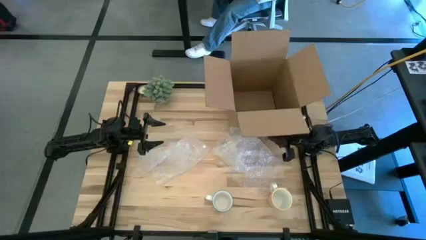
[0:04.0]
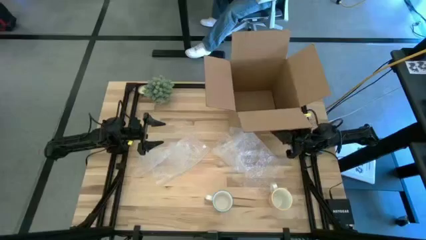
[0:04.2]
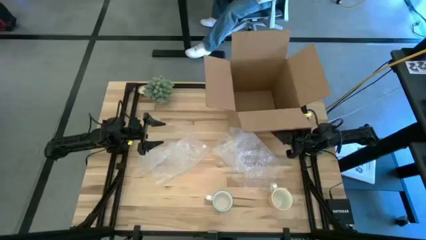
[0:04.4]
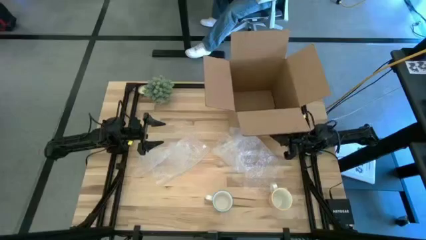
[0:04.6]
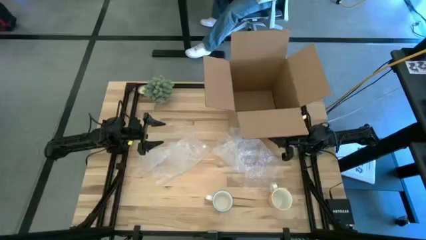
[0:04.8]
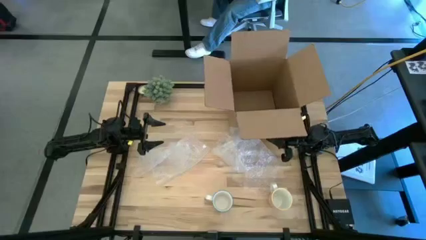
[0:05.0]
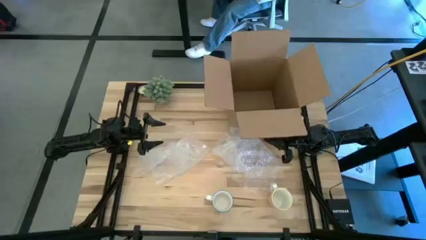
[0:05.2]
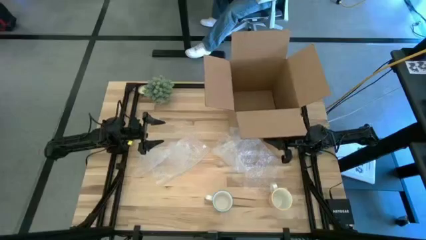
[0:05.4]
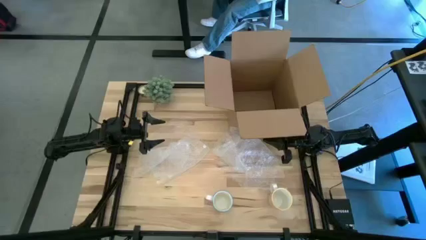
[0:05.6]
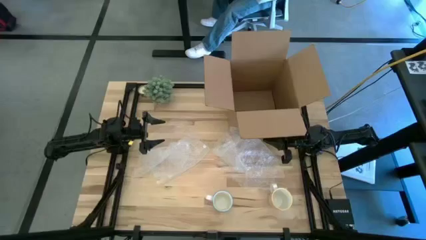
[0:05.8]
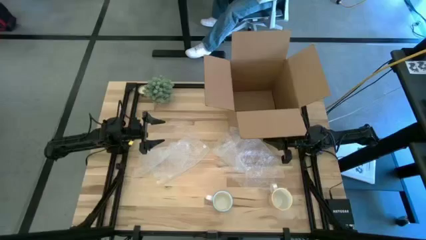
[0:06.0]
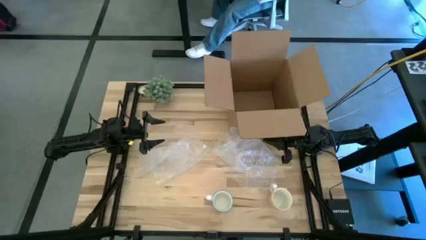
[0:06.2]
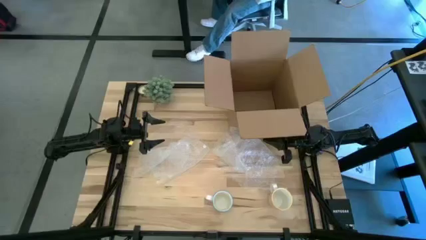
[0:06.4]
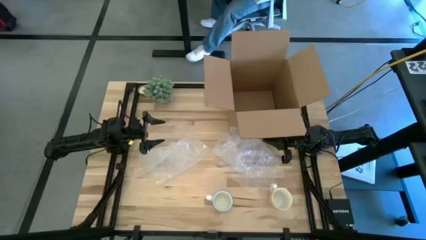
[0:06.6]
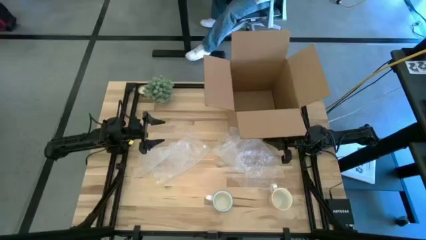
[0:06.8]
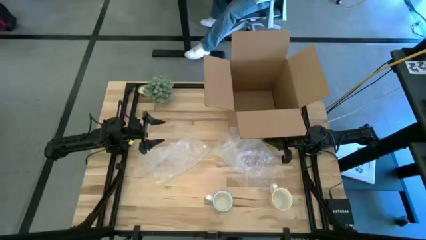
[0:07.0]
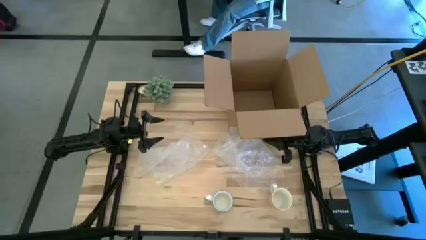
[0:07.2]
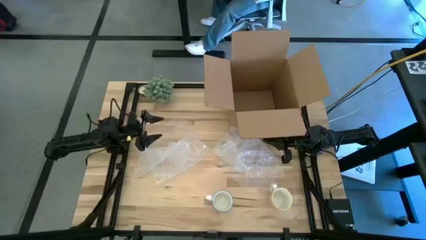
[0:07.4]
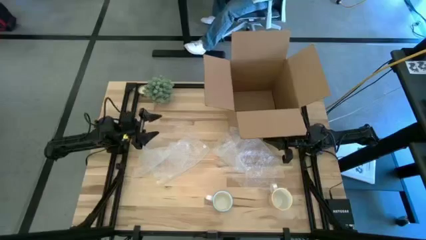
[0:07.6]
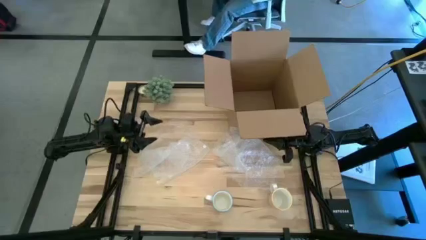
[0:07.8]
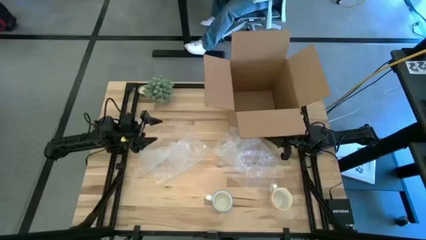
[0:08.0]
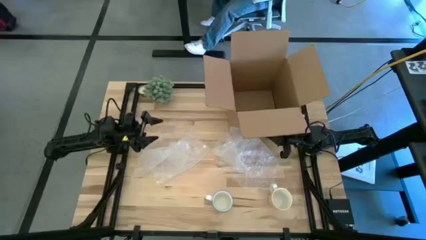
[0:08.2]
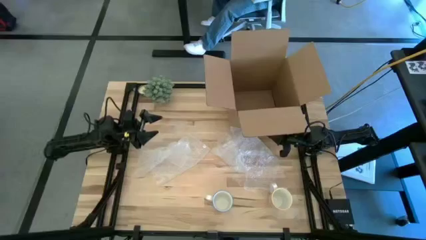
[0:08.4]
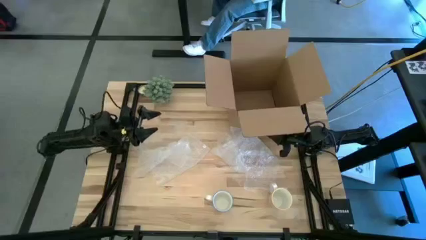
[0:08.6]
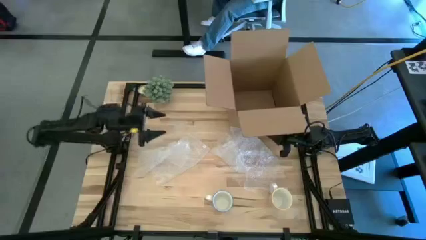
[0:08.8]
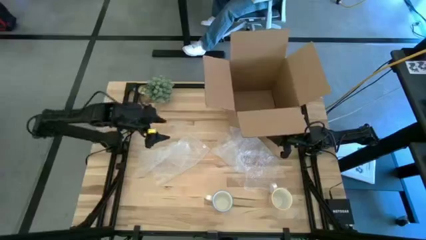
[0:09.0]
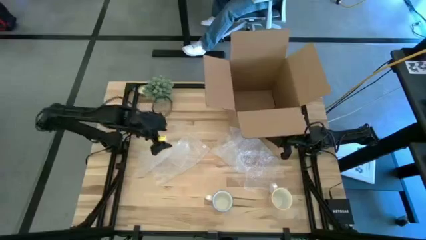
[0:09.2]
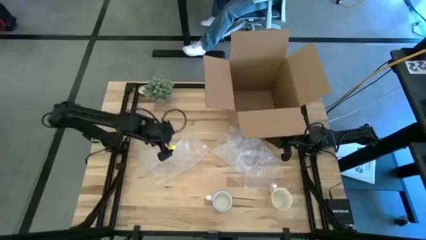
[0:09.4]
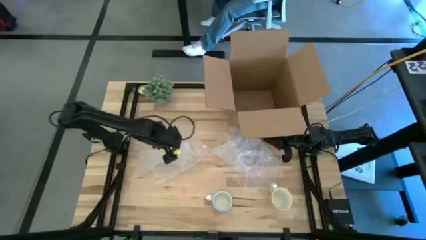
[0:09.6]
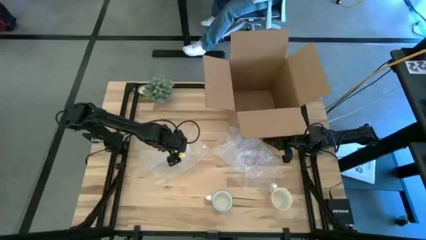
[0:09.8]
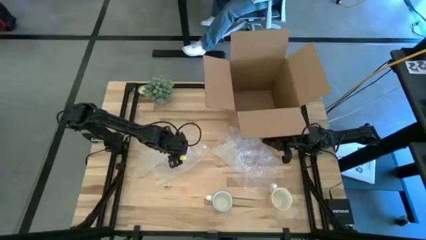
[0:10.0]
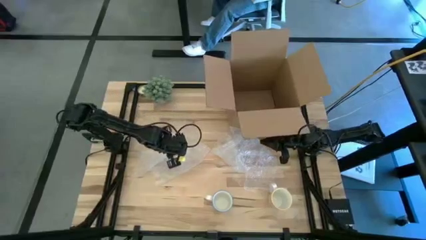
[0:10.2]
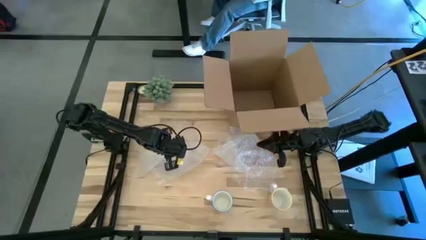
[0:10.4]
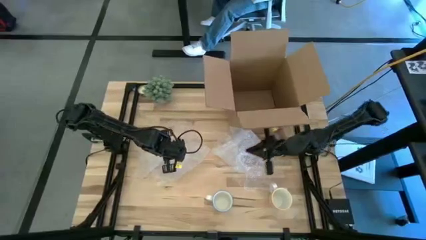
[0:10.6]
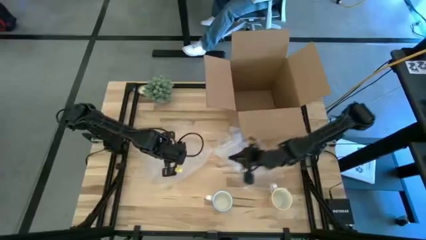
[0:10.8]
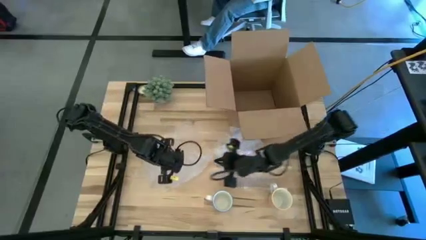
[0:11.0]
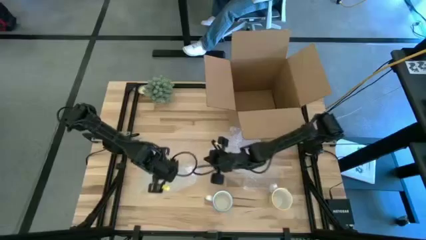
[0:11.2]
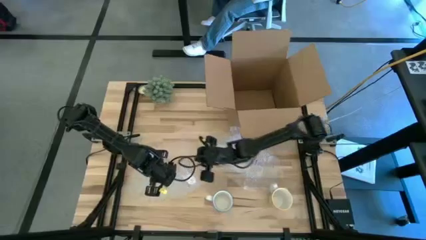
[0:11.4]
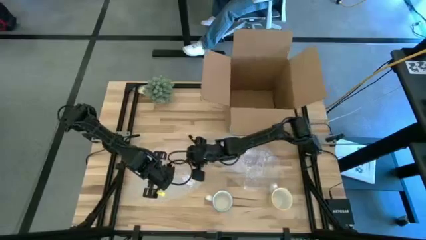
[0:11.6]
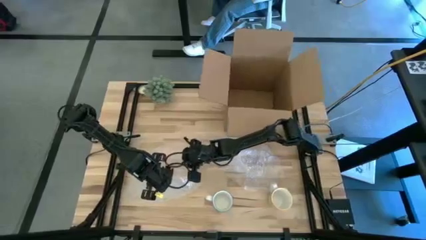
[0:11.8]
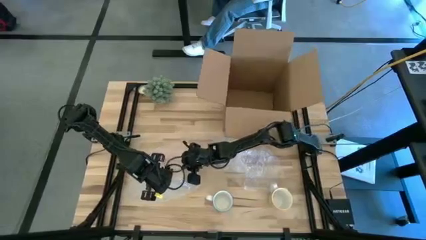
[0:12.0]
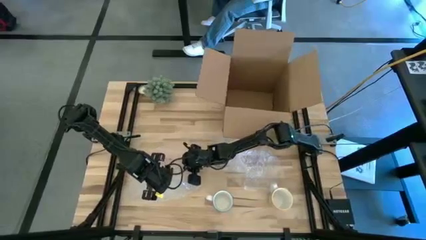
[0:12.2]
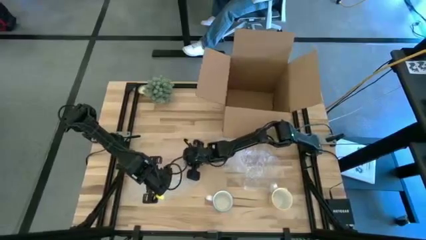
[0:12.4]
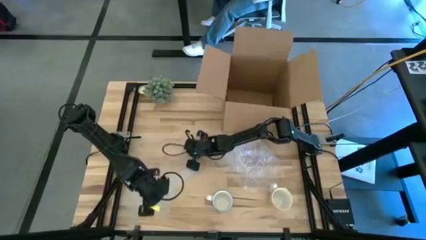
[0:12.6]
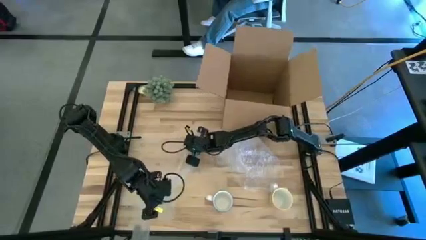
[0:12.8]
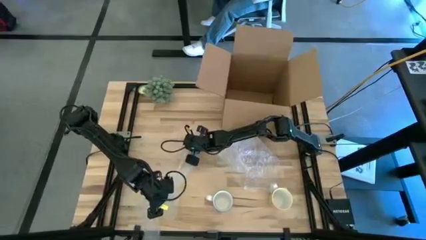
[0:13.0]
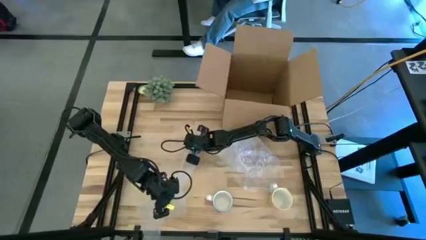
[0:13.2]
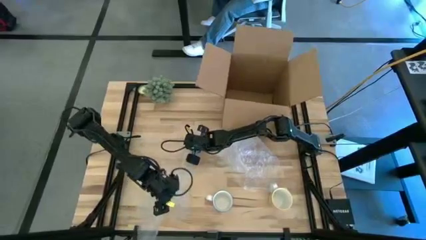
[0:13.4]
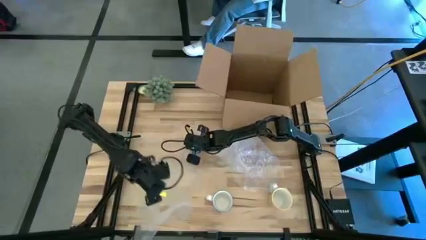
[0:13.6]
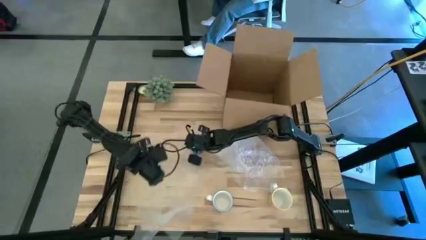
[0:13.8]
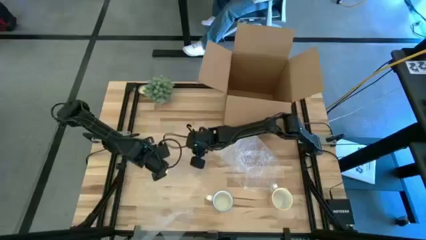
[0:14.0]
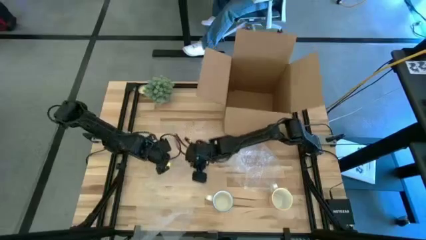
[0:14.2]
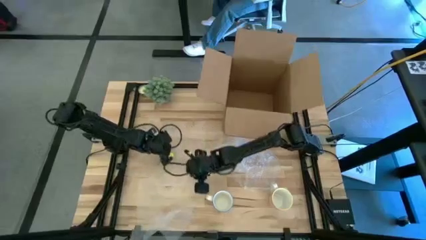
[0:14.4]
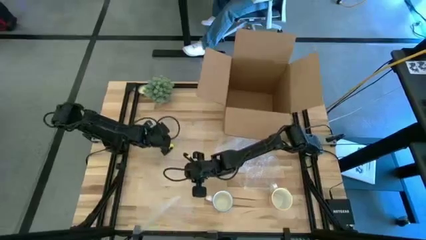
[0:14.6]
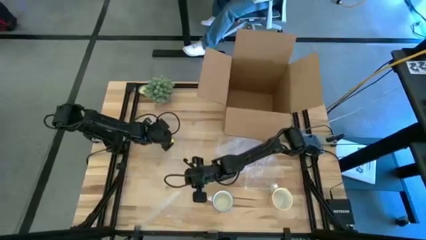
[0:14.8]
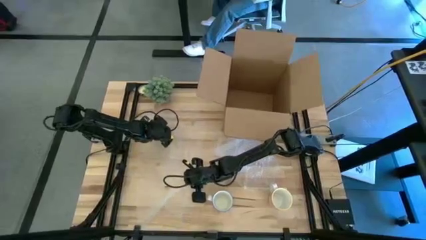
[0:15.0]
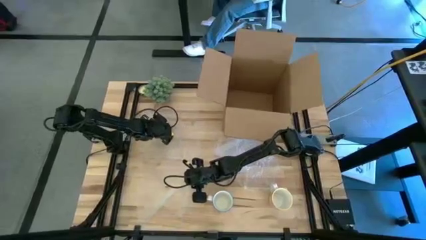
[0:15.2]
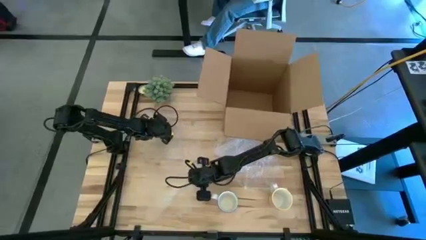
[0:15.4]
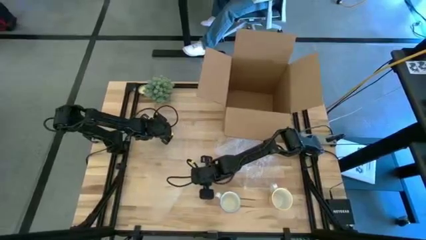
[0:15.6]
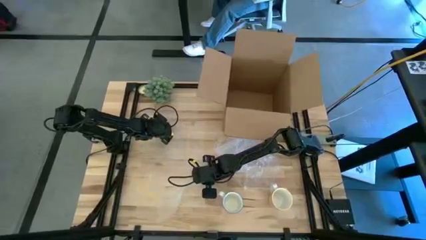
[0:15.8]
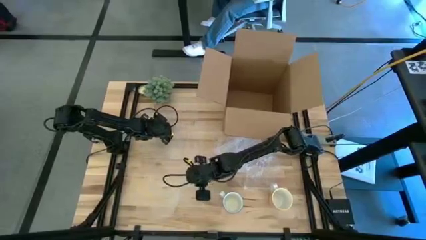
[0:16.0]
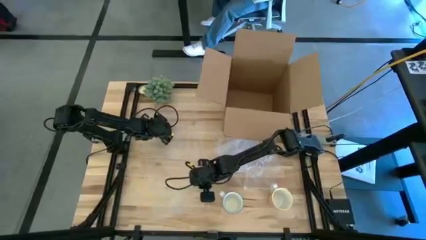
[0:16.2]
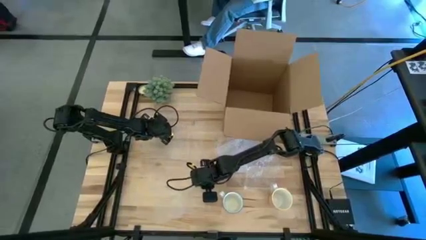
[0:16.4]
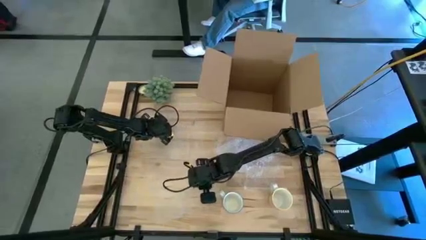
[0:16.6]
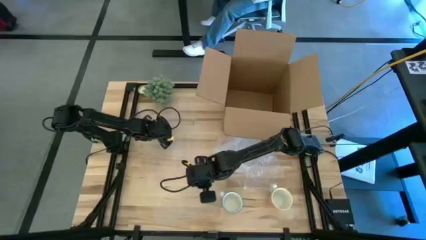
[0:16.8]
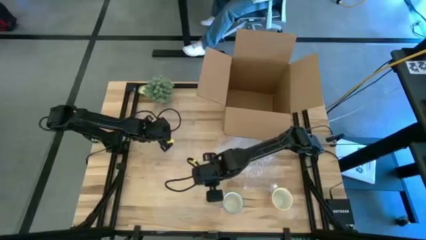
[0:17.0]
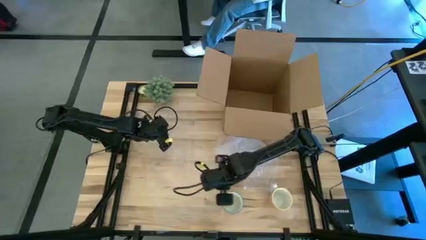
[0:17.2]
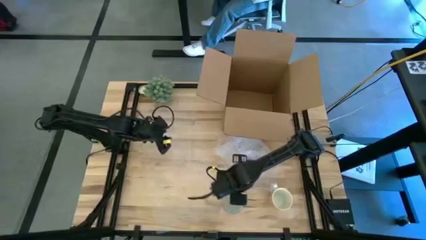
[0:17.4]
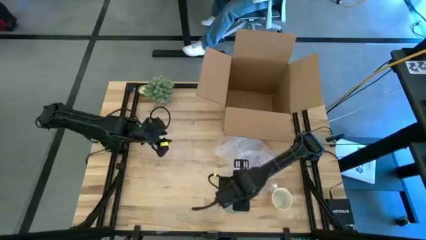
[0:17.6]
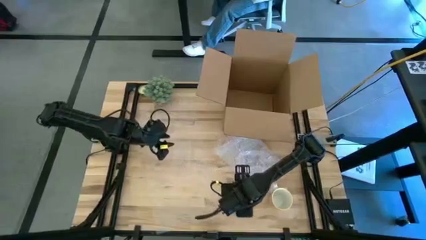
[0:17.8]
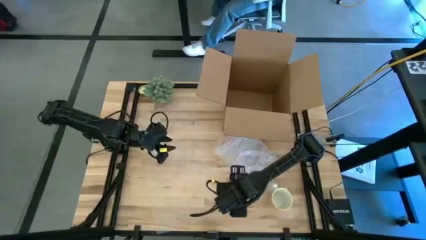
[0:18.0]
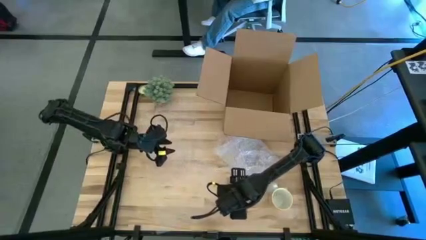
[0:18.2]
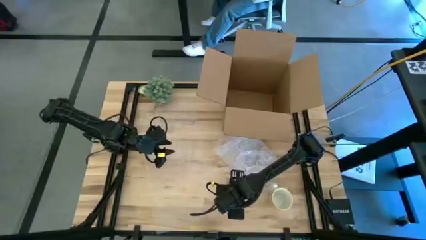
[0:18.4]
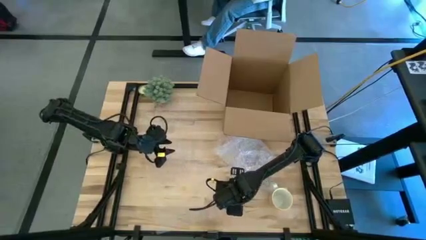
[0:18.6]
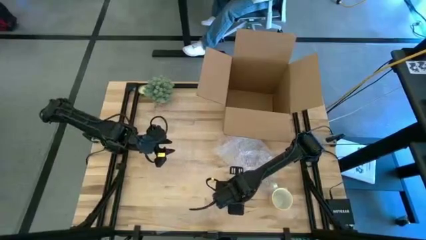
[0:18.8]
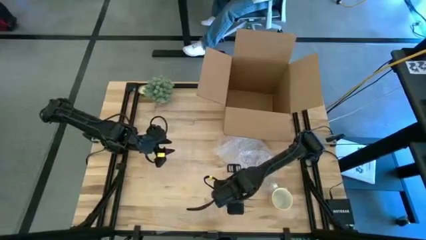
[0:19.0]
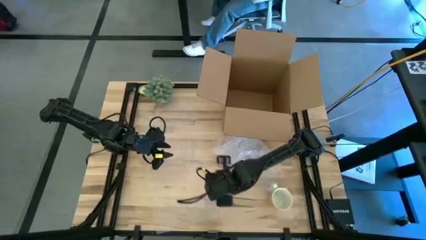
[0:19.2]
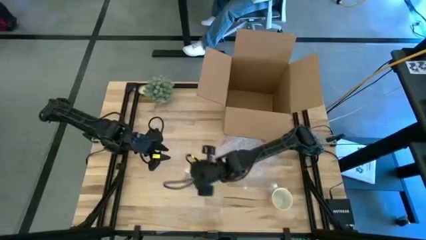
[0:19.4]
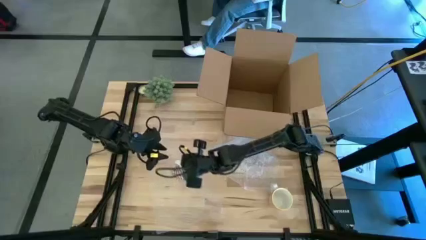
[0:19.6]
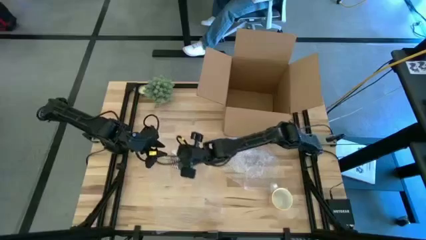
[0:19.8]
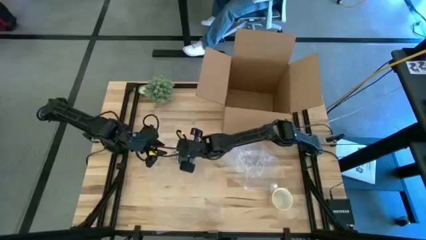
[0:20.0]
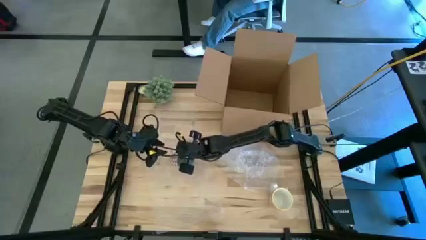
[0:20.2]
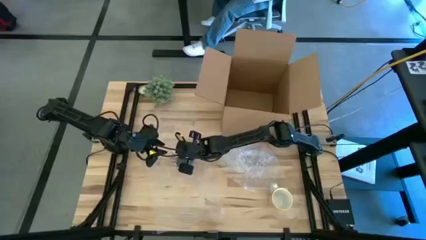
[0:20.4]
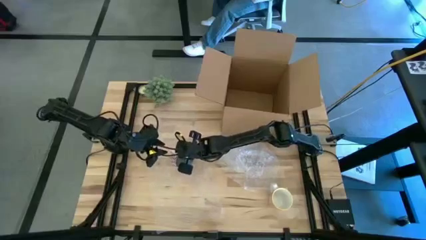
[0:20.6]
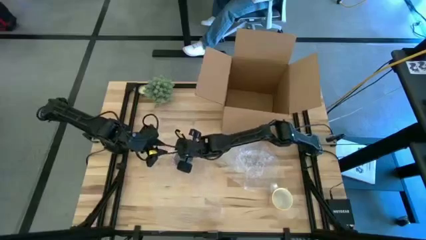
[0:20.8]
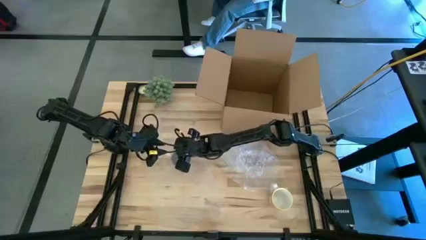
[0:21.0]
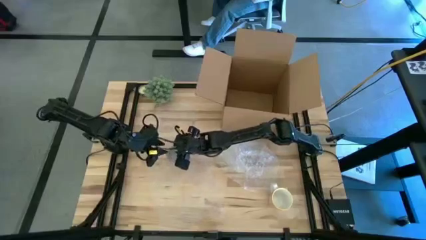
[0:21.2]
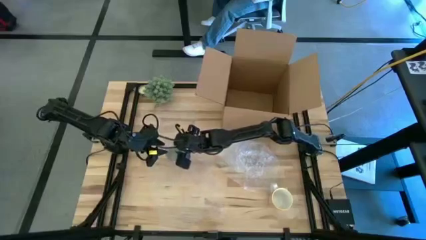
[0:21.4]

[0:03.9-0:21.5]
Task: wrap mug
Wrap the red patterned mug with the bubble wrap
